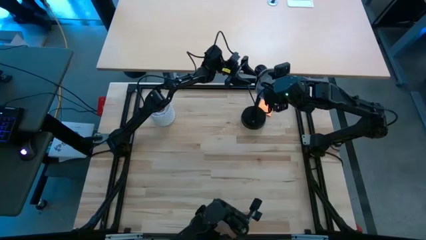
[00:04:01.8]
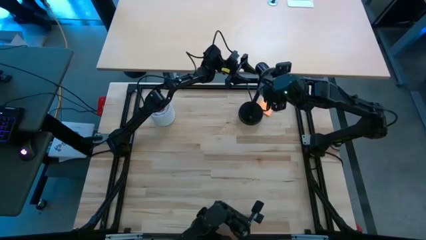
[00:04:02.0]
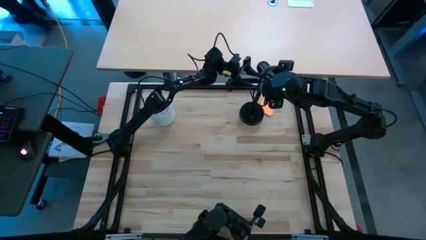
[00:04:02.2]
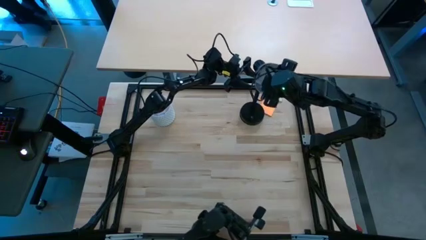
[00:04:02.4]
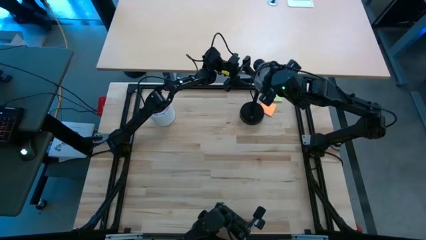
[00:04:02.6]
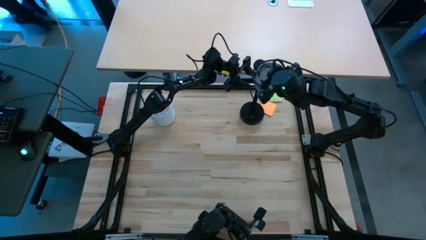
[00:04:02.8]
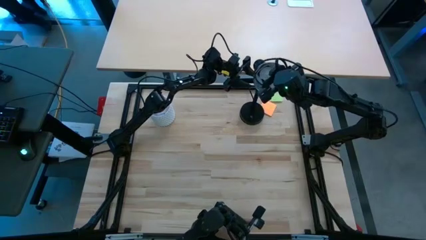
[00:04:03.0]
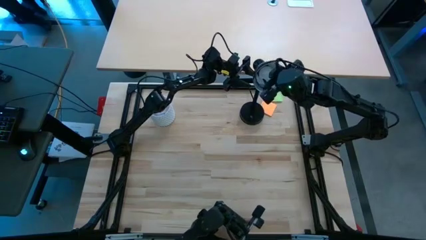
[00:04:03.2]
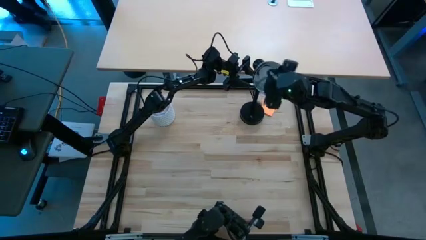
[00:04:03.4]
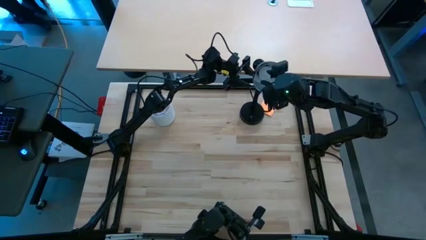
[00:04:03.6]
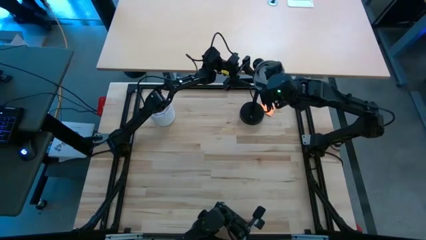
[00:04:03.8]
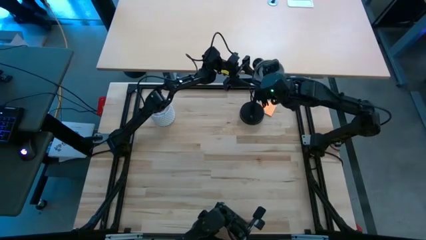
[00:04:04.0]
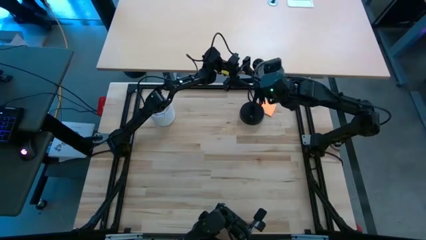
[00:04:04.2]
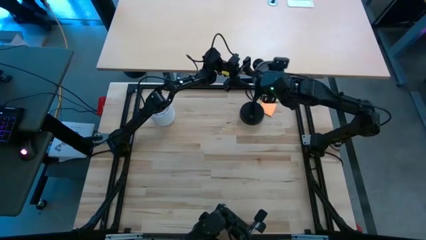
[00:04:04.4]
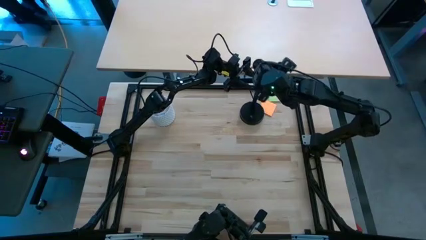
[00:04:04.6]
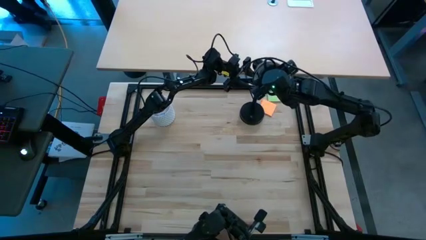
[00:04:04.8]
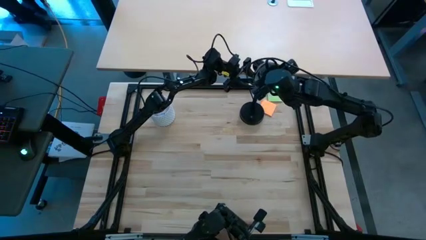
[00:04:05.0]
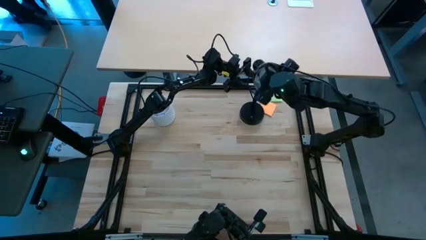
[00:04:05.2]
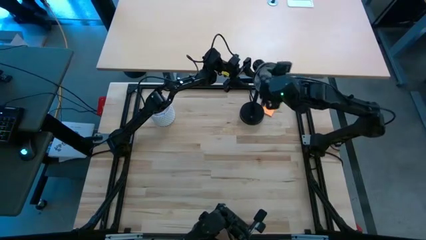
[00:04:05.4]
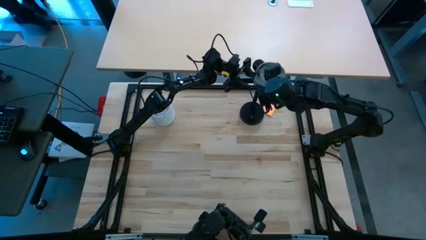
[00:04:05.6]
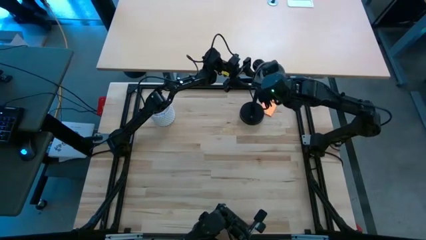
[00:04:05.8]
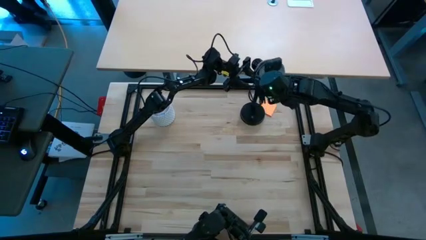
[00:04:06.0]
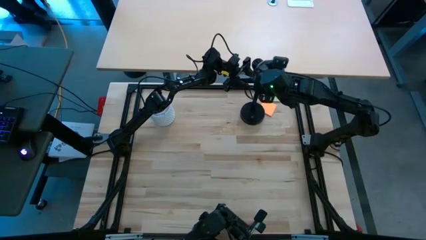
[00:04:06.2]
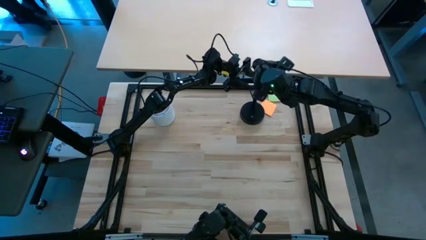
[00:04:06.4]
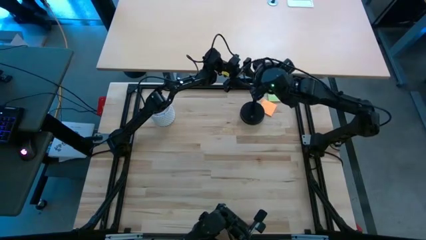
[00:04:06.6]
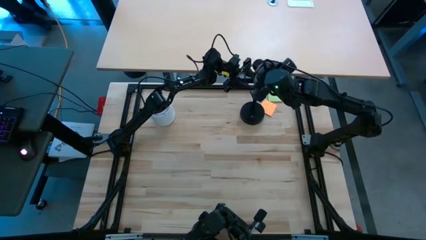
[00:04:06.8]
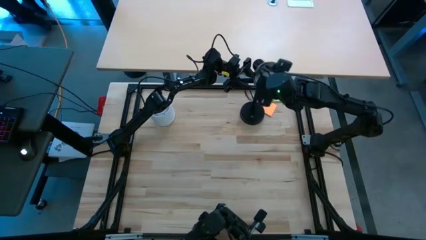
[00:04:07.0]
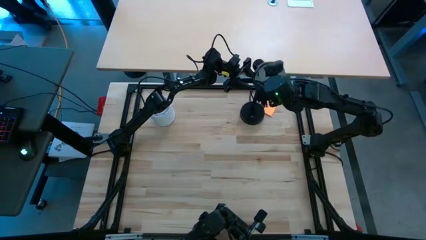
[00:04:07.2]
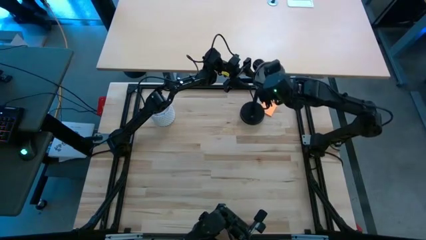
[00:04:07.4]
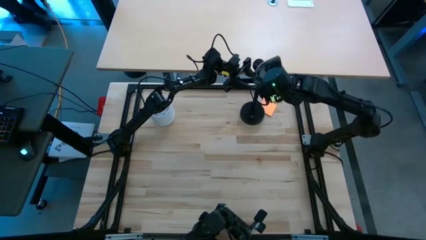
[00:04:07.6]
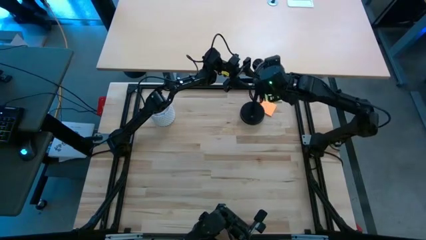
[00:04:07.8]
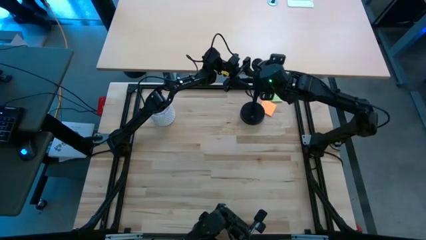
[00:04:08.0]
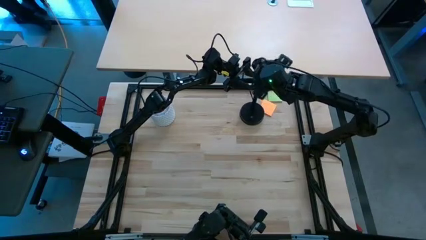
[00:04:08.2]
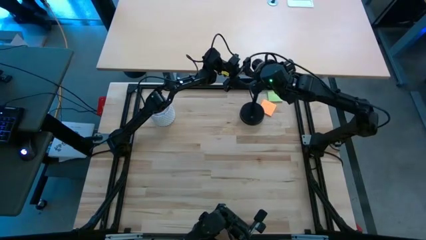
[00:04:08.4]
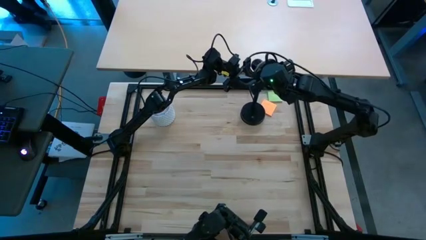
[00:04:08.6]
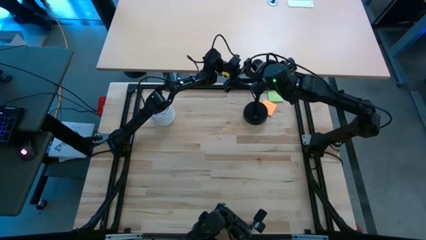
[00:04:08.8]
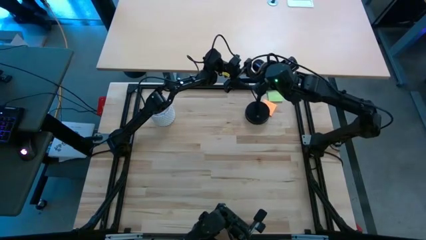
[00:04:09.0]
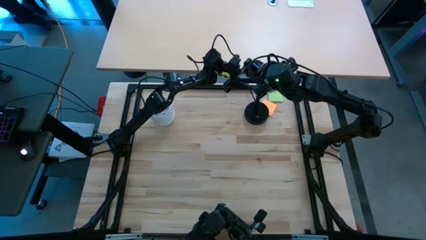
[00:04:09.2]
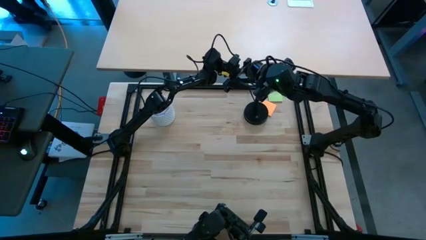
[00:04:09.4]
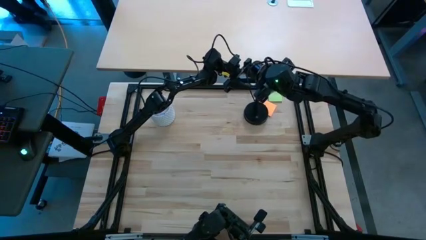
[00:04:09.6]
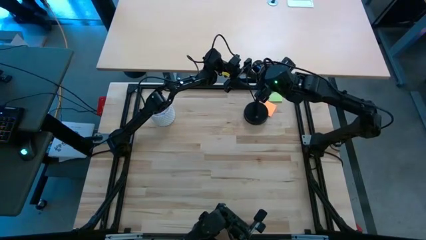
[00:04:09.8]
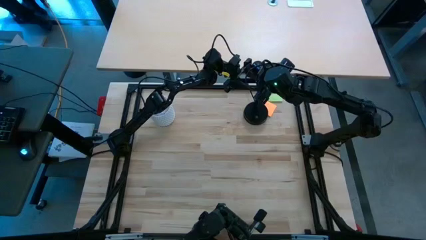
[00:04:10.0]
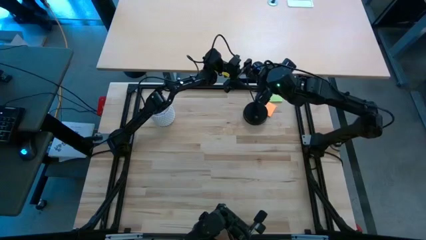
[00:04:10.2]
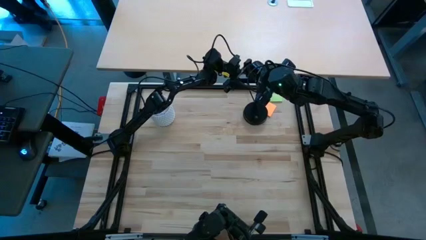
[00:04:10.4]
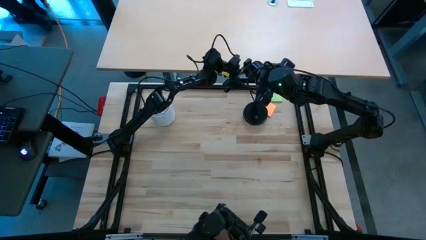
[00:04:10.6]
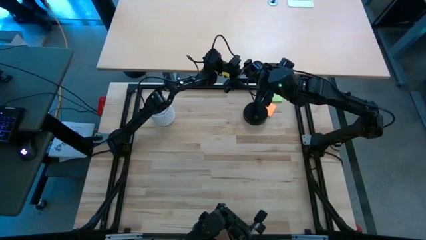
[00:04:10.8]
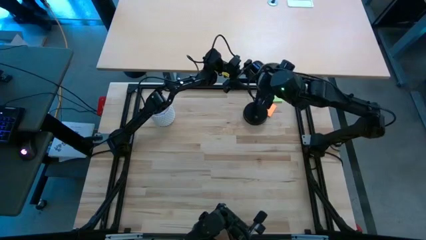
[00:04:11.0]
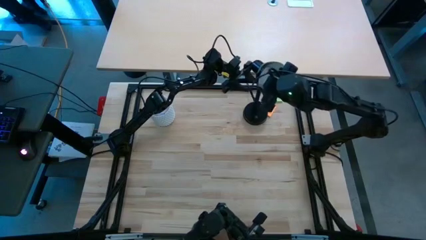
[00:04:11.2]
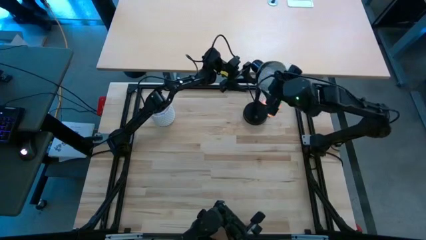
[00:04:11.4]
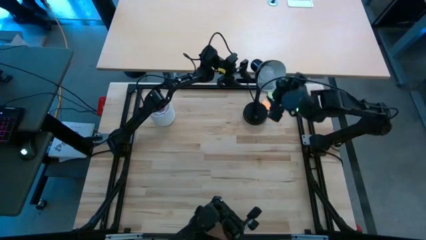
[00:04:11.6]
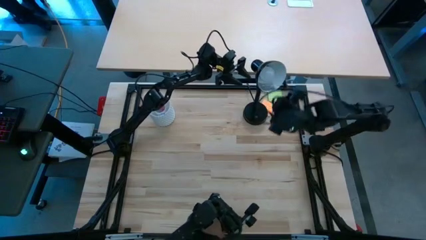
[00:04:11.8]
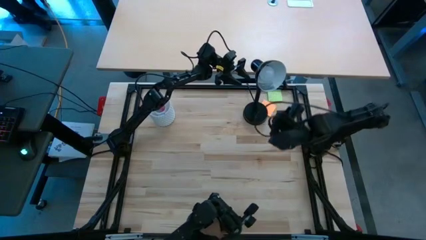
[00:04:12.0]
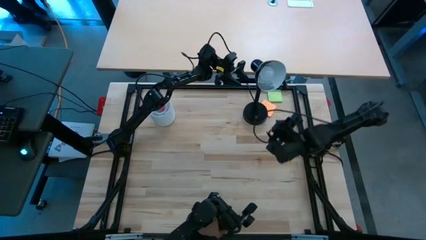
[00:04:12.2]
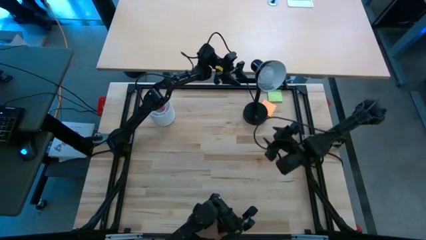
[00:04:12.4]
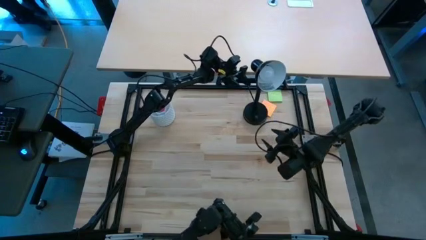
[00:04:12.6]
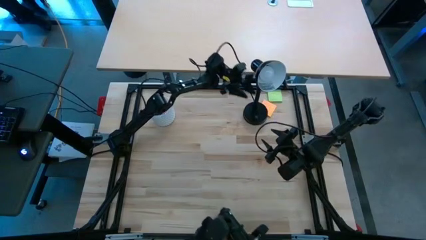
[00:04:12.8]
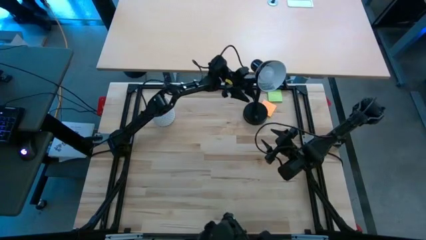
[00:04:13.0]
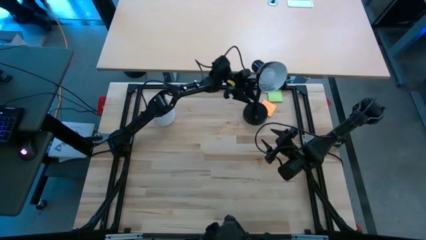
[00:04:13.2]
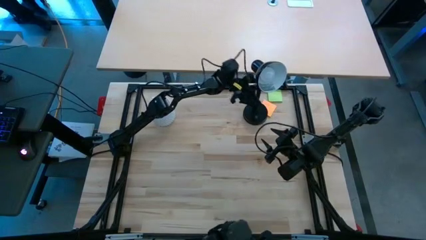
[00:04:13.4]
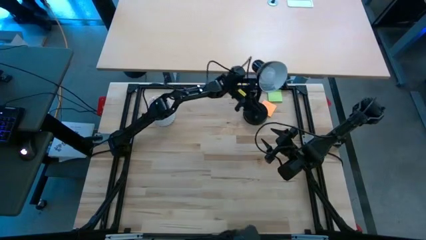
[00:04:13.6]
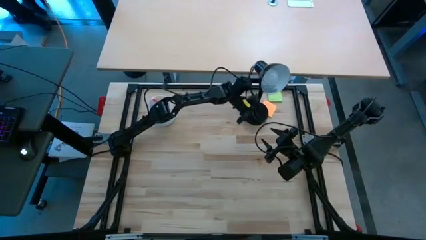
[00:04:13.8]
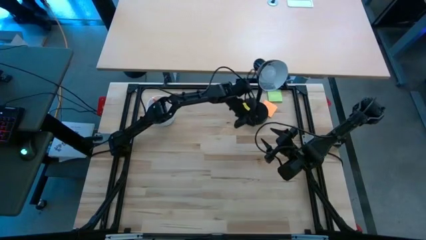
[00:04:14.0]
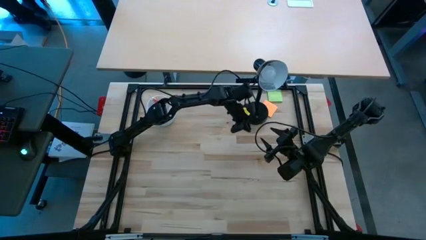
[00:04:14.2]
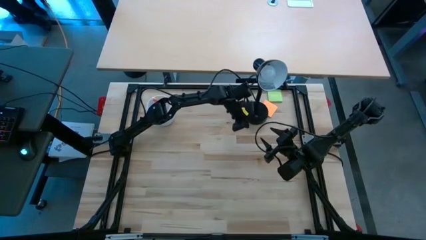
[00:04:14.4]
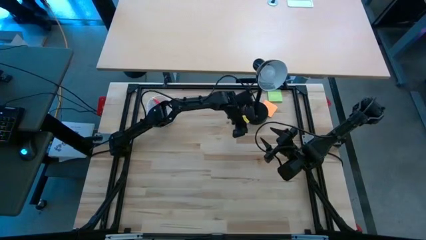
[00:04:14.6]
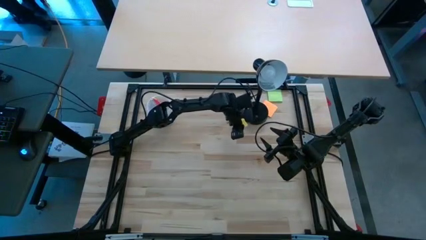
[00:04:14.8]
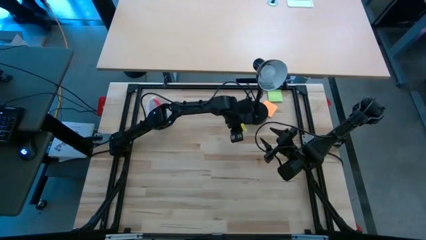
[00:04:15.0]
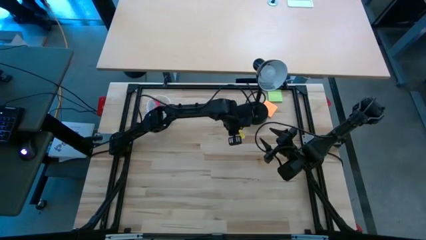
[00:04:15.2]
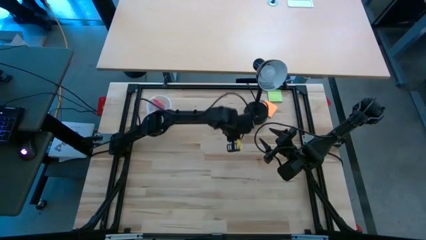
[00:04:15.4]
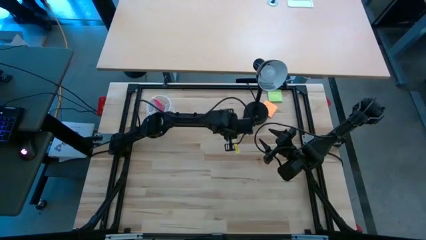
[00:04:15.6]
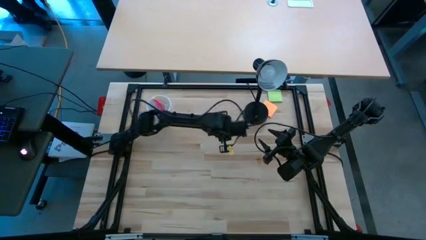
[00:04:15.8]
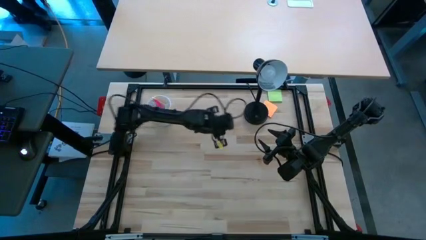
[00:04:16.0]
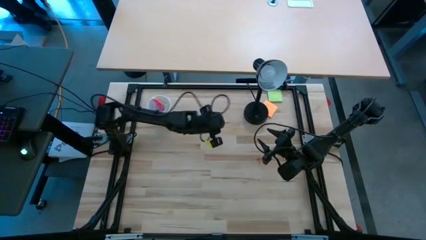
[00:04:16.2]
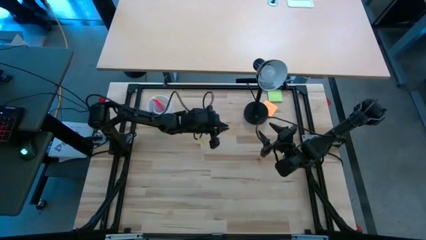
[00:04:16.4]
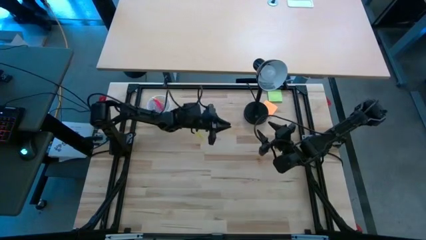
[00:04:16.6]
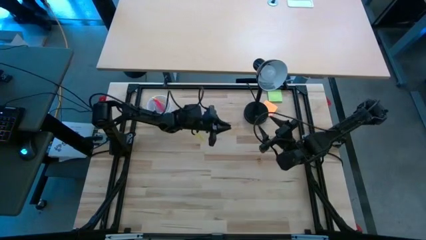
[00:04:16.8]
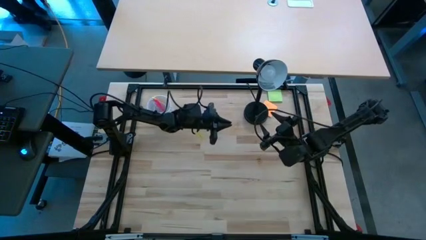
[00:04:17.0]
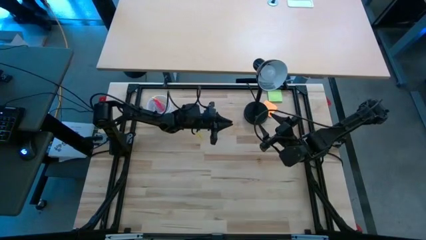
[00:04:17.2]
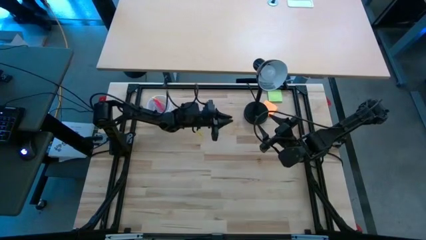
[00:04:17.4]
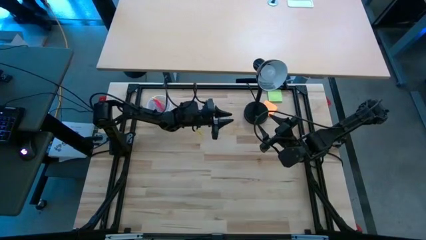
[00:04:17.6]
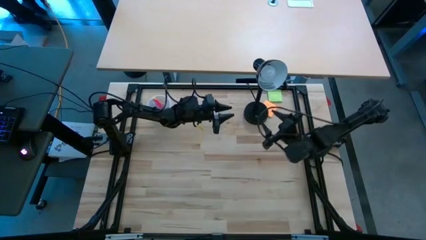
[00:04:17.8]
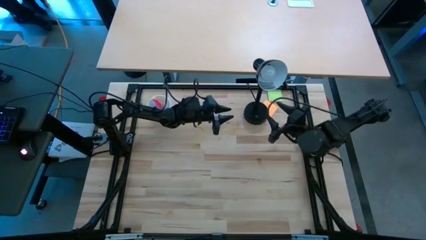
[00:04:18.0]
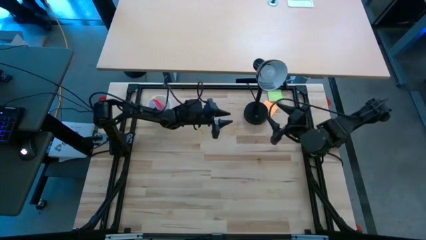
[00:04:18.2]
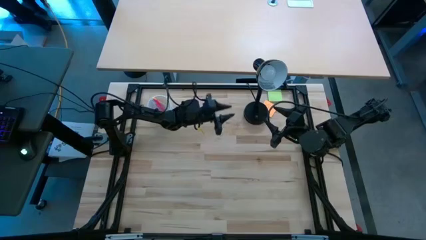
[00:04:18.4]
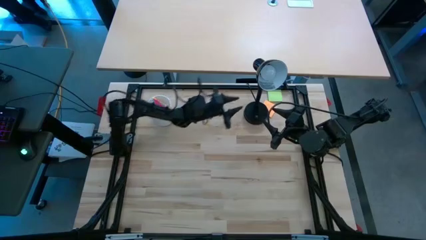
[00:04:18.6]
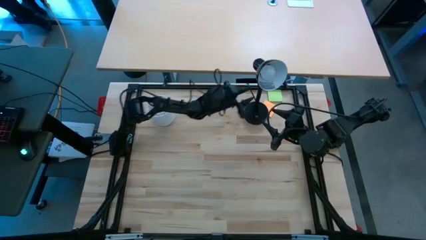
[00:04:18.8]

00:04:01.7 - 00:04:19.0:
Task: Screw lightbulb
Insert the light bulb into the desk lamp
